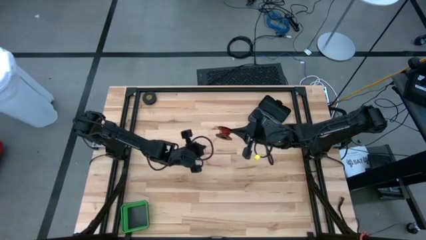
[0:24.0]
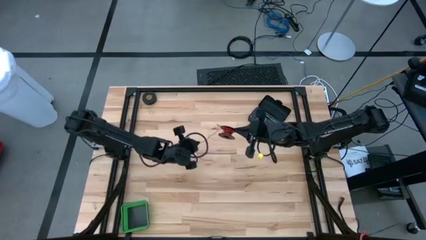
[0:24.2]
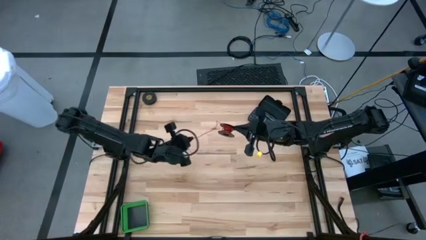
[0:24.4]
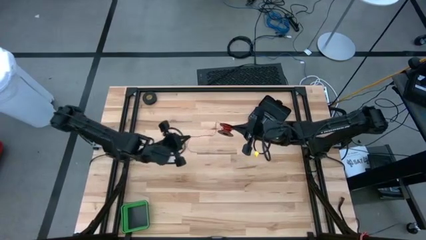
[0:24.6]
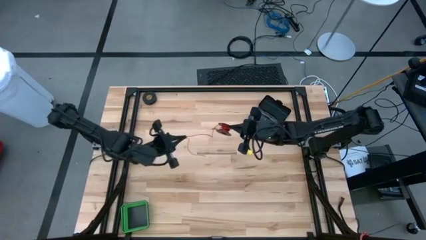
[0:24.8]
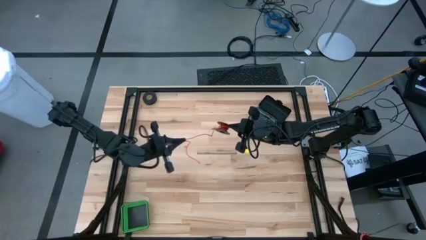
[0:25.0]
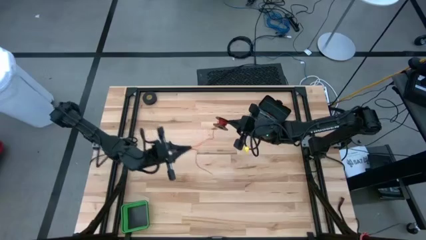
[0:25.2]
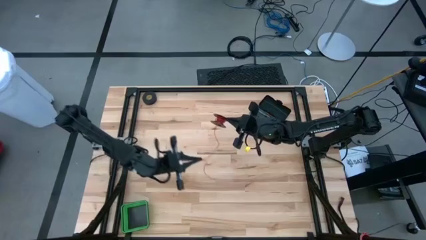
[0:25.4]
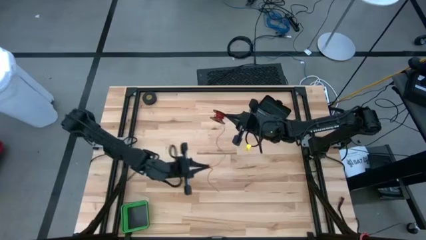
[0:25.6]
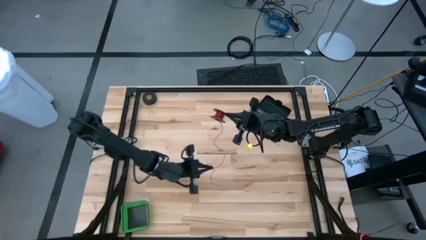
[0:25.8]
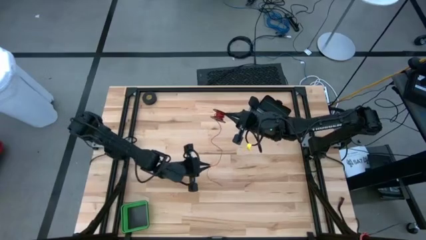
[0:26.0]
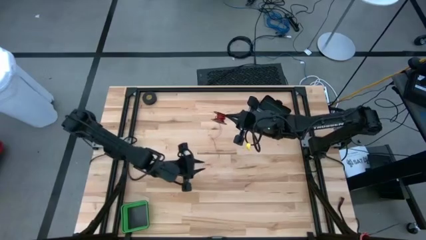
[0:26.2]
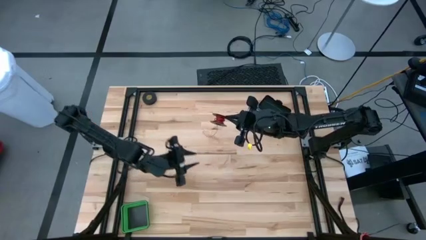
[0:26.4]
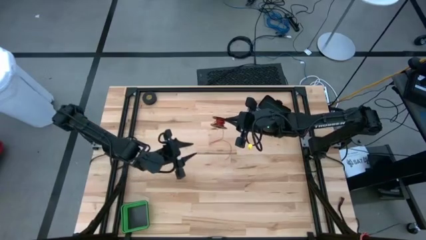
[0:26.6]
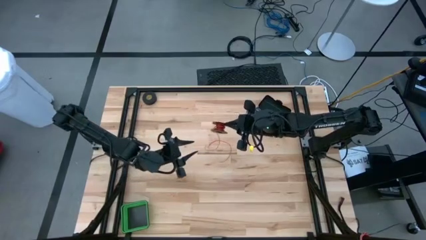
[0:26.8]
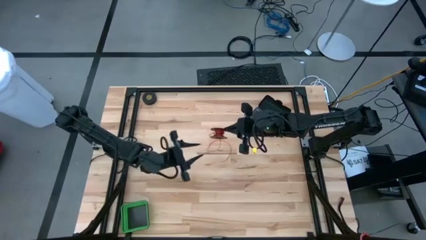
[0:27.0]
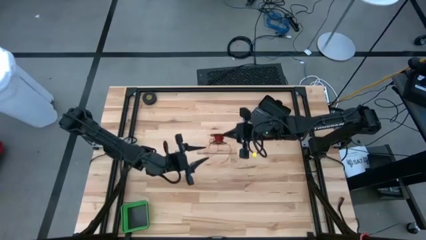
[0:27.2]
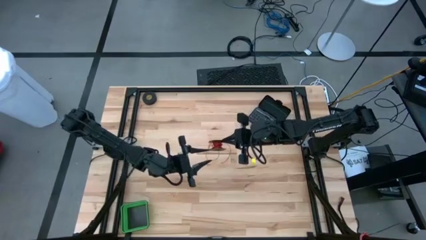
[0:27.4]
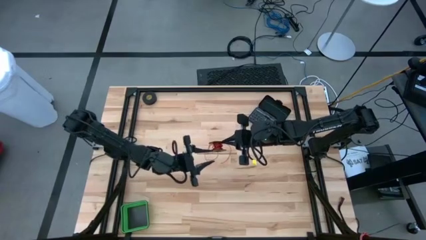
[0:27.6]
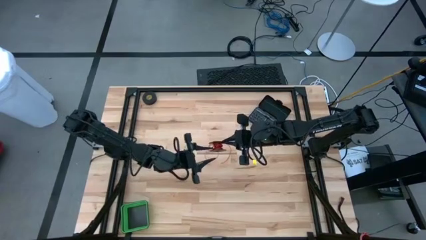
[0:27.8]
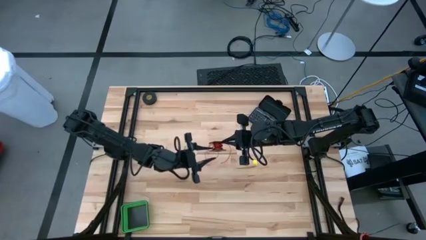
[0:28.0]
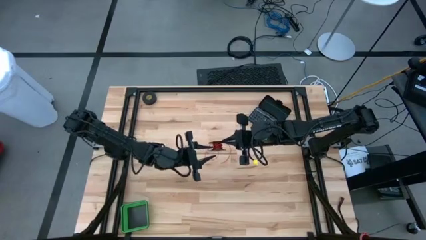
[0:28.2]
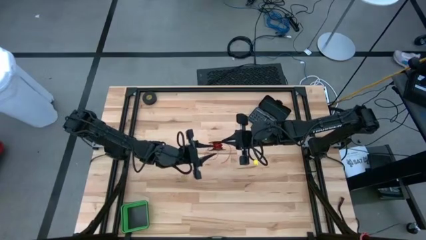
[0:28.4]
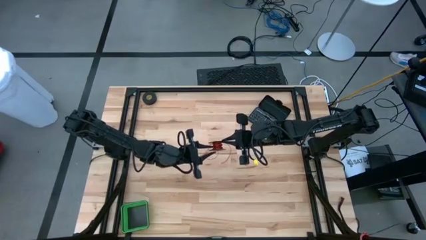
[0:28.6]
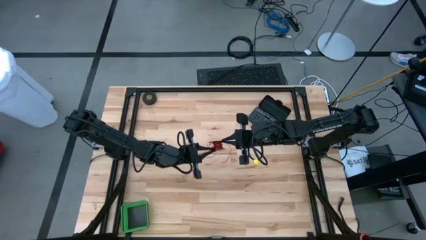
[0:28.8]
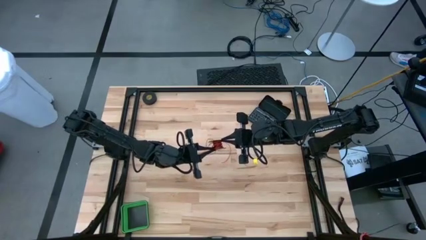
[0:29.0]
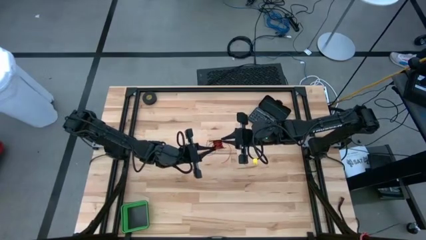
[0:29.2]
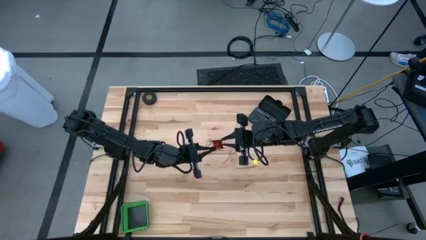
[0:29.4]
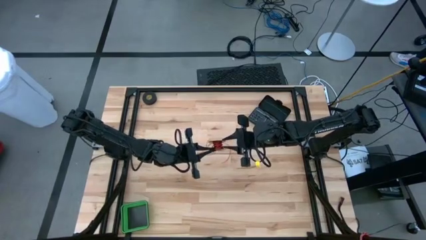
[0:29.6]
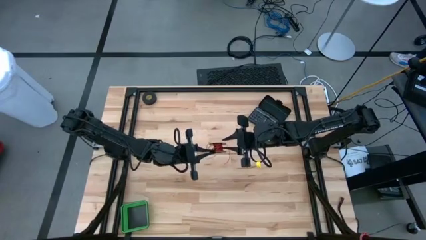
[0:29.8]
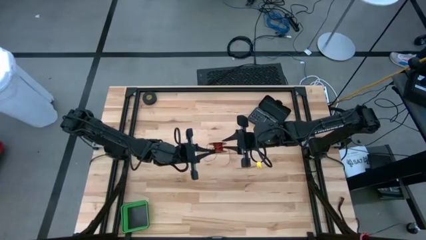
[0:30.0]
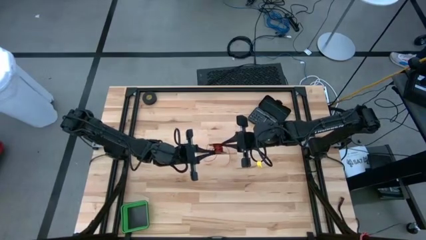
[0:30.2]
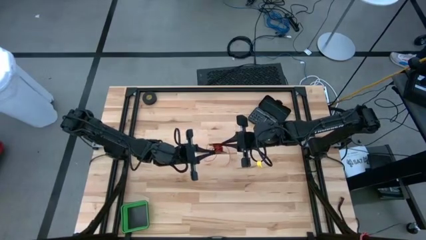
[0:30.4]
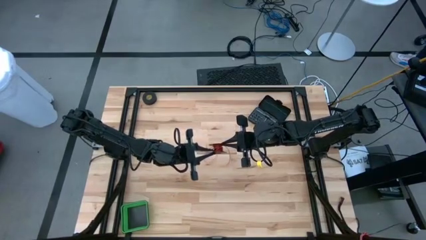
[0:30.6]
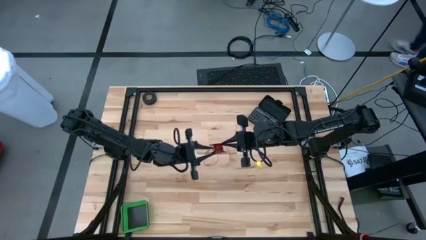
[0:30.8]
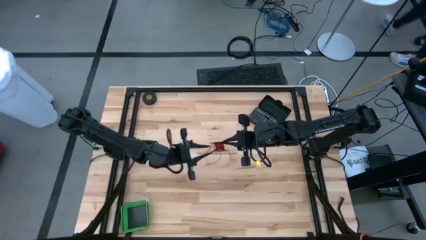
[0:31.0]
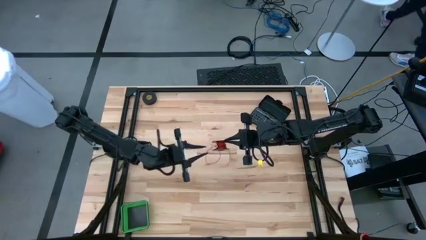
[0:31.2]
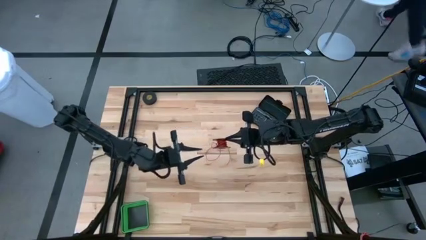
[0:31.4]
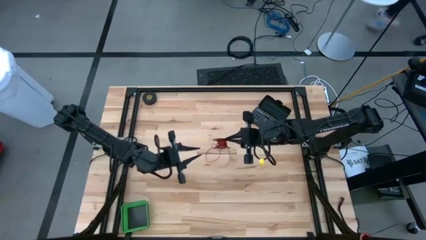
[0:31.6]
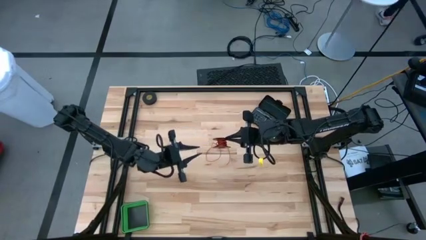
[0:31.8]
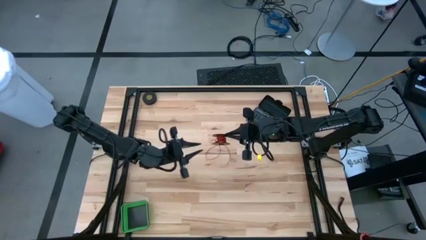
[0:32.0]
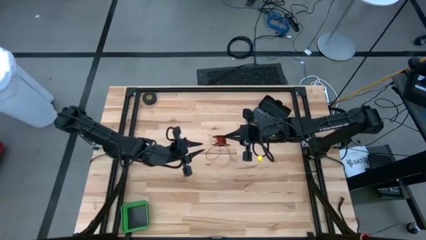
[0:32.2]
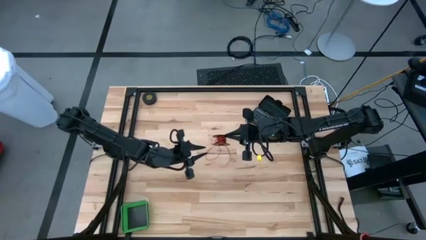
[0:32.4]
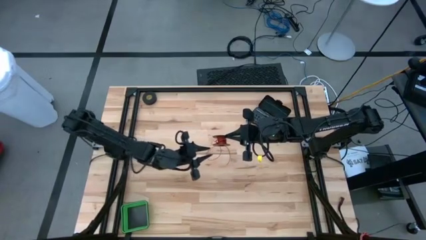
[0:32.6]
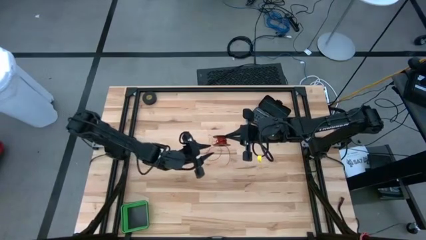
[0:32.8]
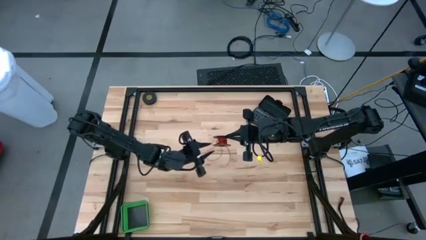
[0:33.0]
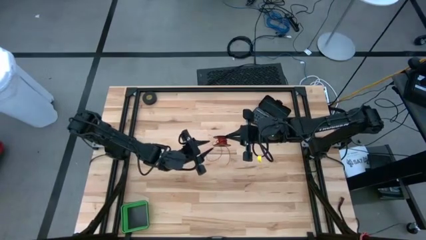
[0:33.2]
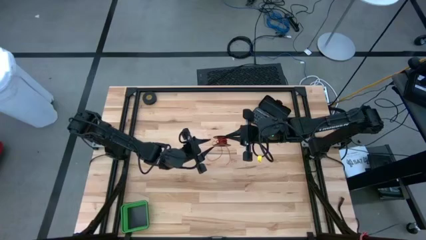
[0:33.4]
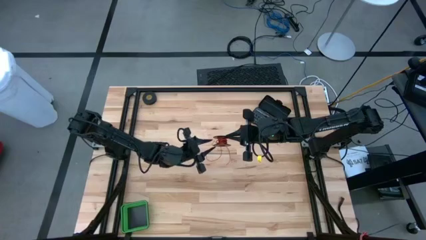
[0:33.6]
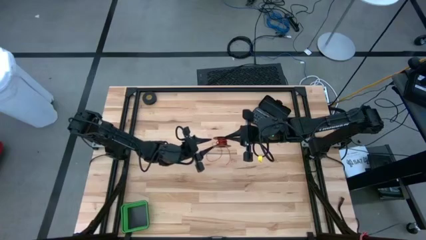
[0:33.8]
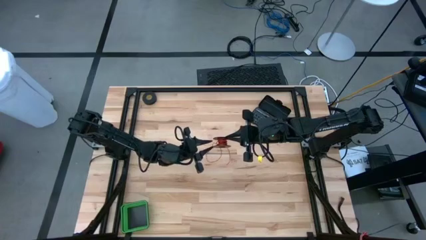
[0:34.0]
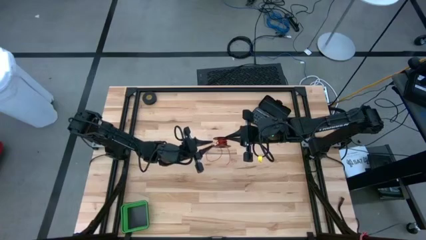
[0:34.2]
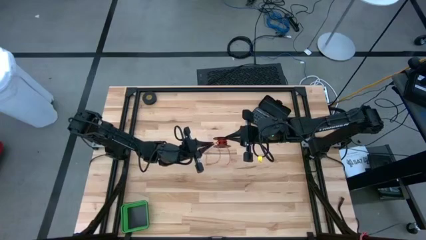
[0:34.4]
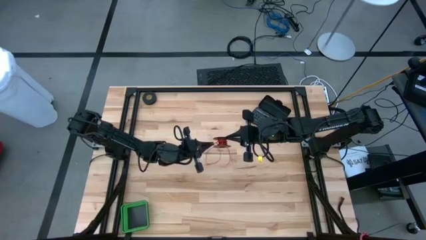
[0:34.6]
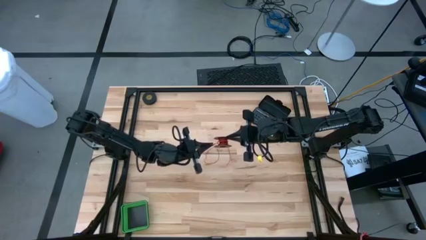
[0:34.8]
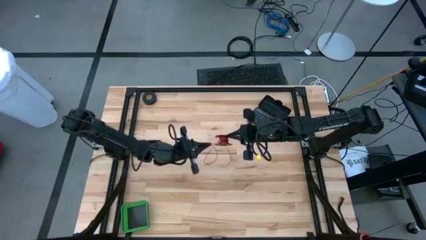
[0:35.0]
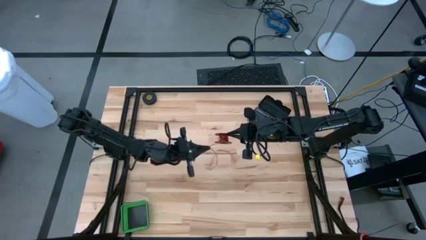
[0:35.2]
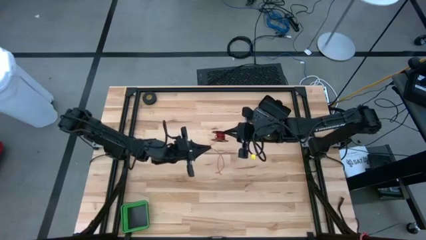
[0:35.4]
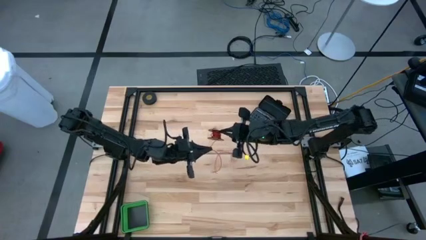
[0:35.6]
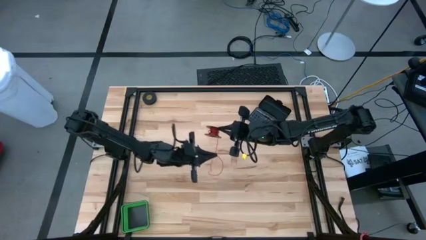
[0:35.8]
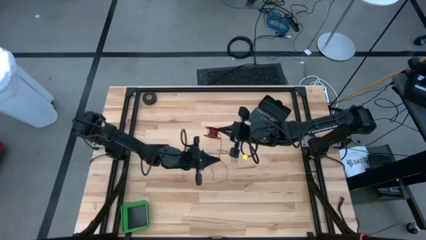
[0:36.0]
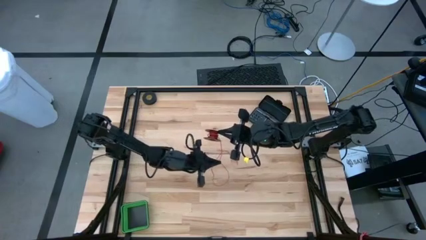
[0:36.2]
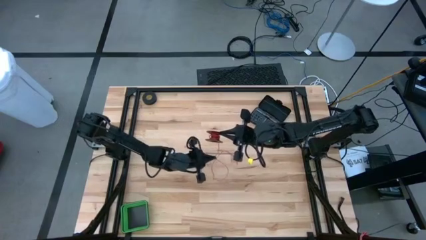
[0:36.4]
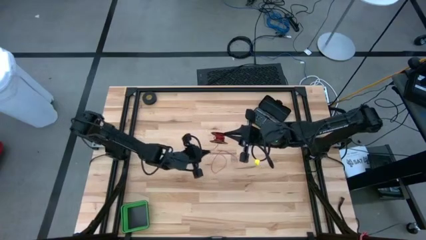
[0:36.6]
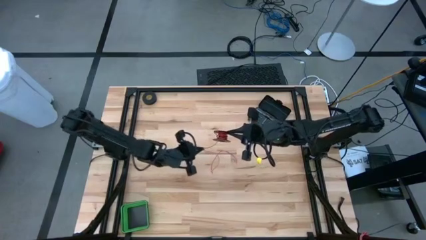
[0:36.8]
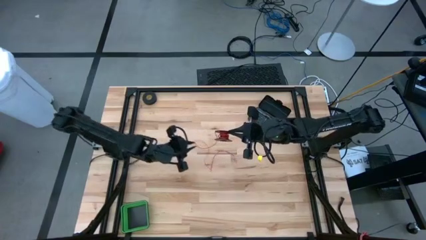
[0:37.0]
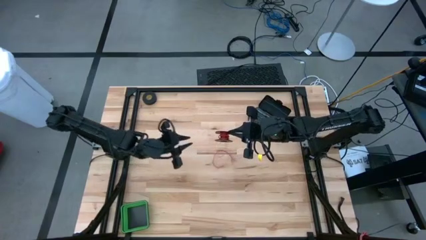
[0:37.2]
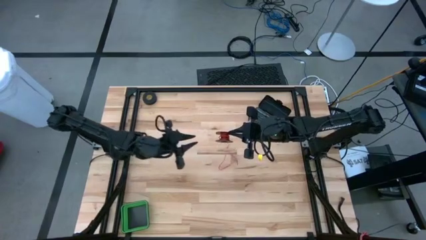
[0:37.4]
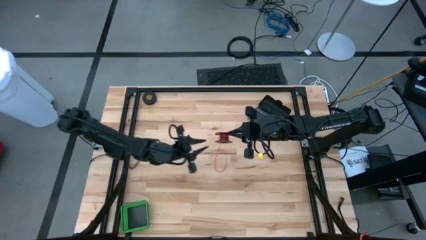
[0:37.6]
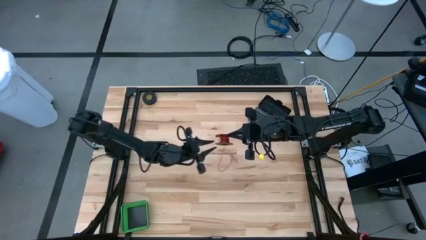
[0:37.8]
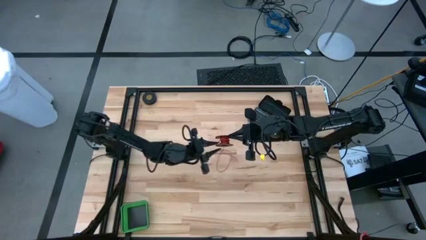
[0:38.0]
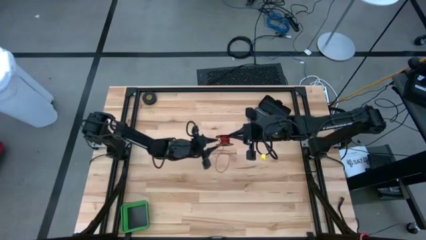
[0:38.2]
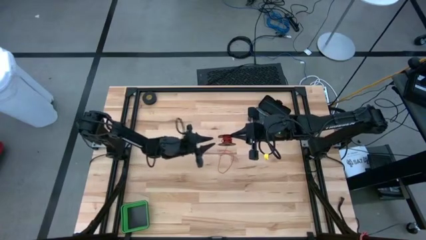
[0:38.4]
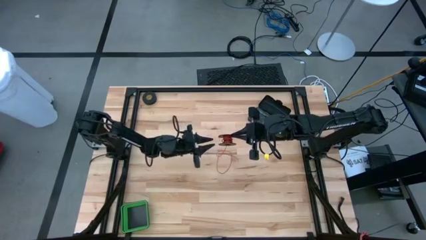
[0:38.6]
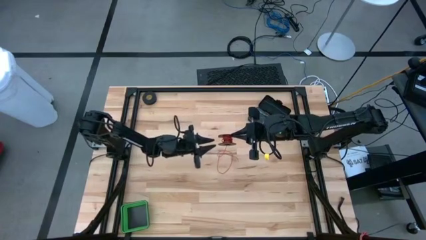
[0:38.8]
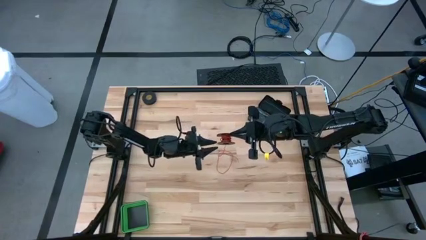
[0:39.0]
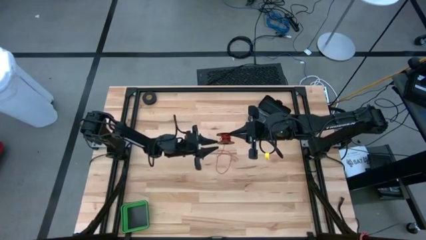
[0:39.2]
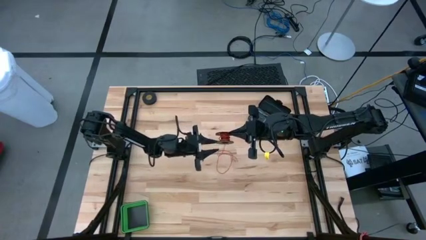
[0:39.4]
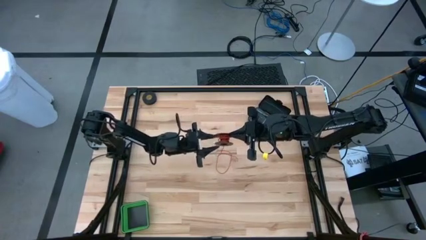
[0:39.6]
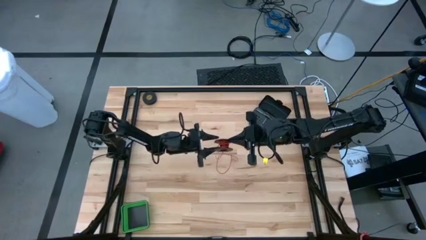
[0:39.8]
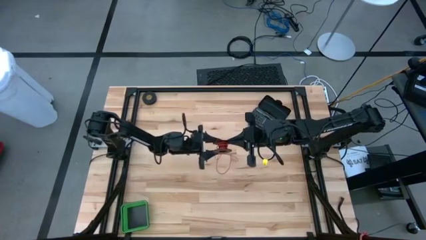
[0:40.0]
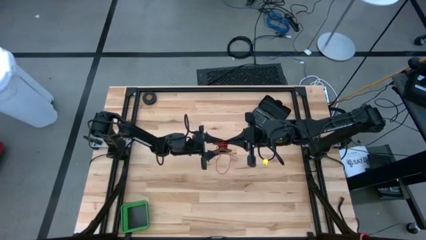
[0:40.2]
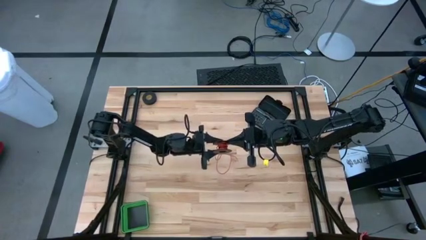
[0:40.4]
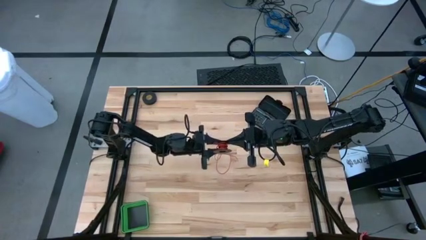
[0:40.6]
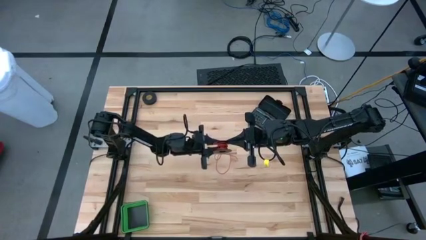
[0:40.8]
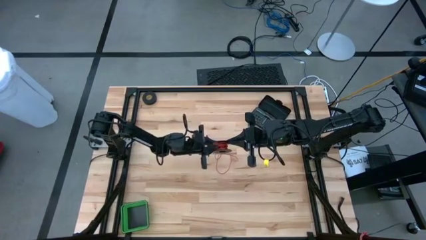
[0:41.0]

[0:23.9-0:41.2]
Task: Coil cords
Uncoil the red wire from the spool
